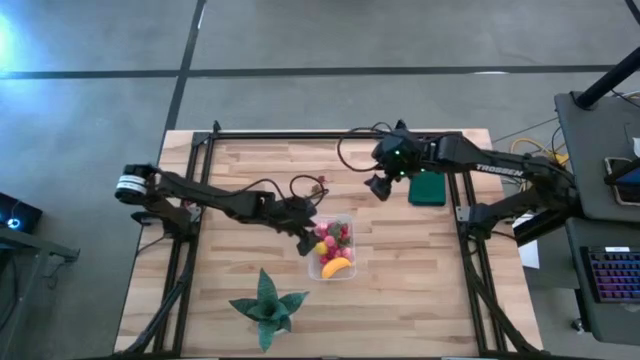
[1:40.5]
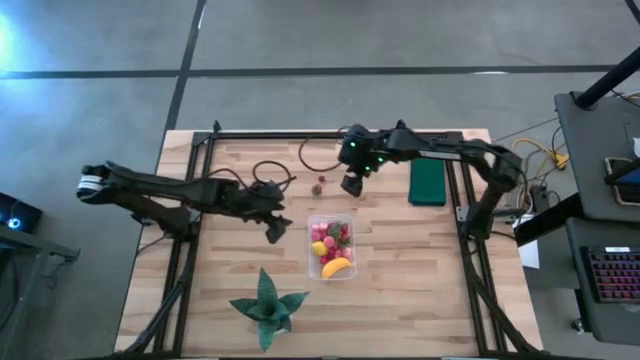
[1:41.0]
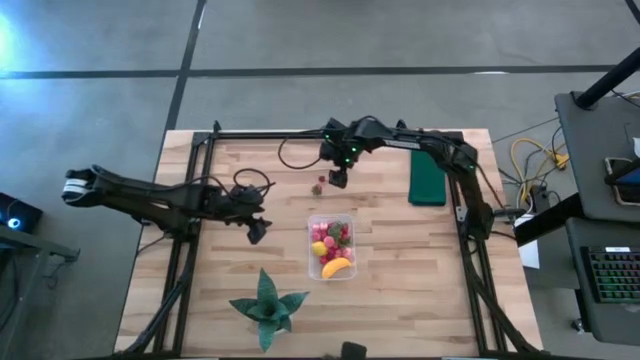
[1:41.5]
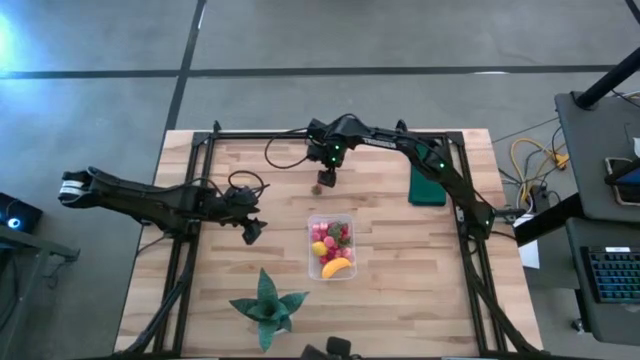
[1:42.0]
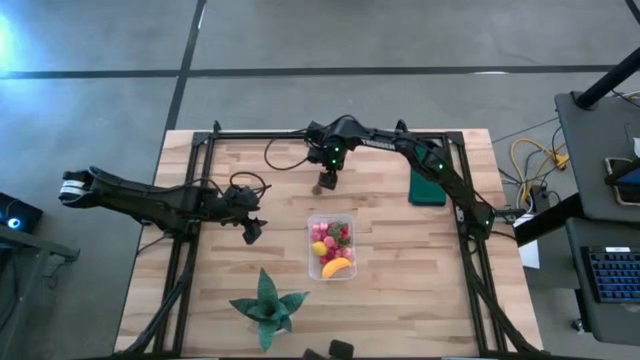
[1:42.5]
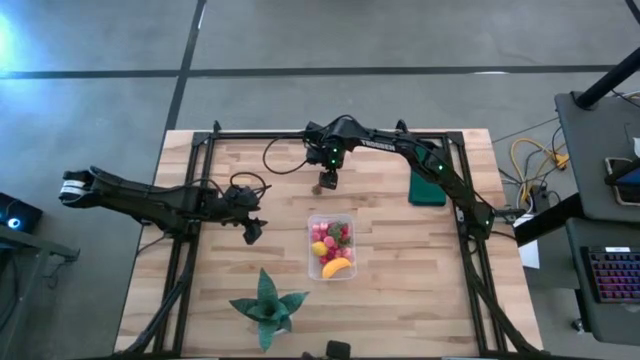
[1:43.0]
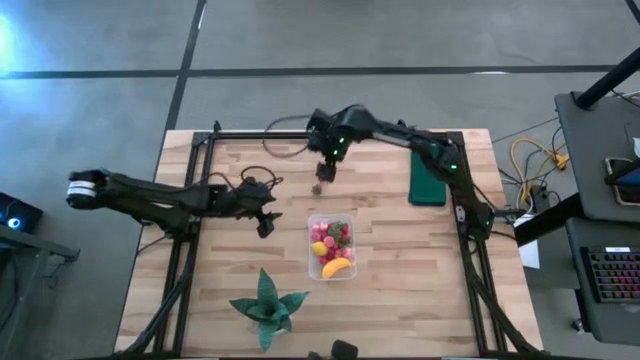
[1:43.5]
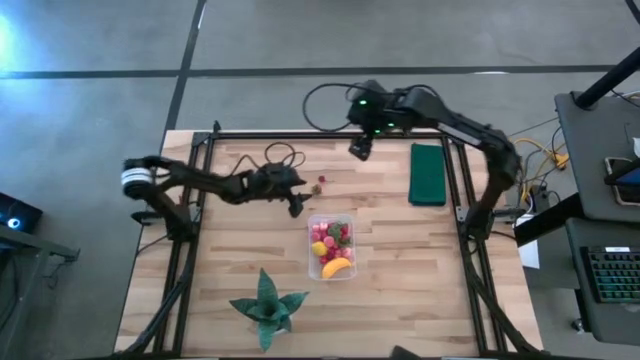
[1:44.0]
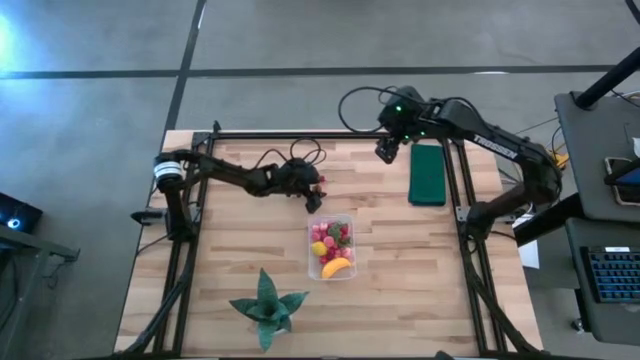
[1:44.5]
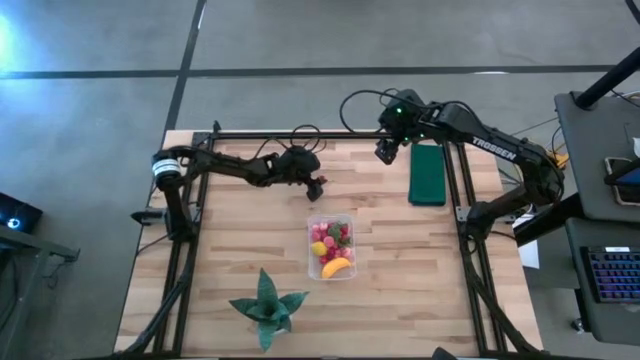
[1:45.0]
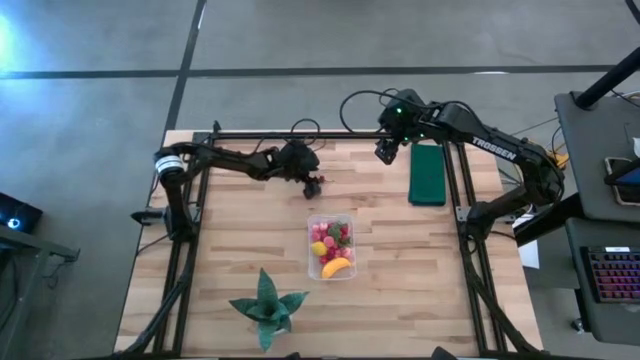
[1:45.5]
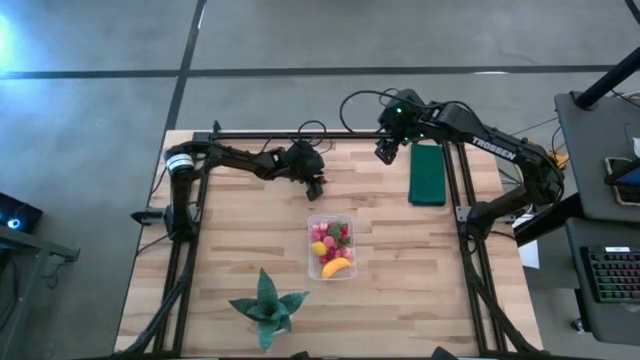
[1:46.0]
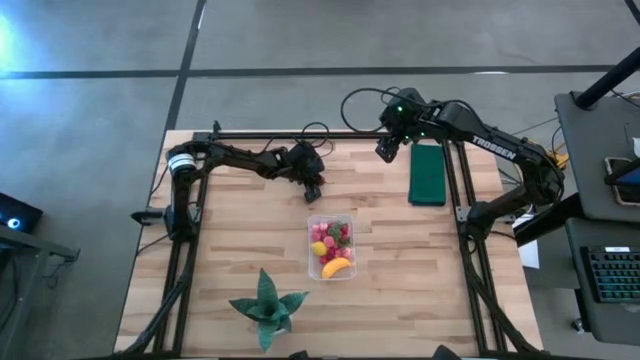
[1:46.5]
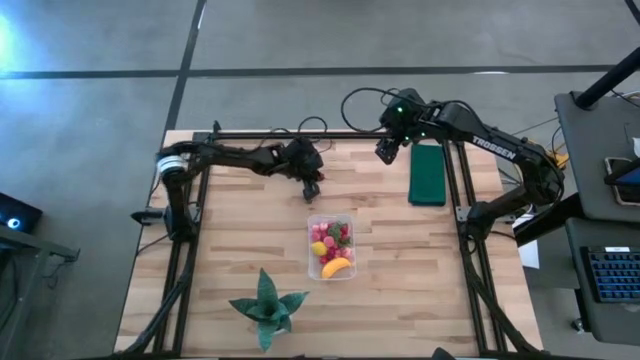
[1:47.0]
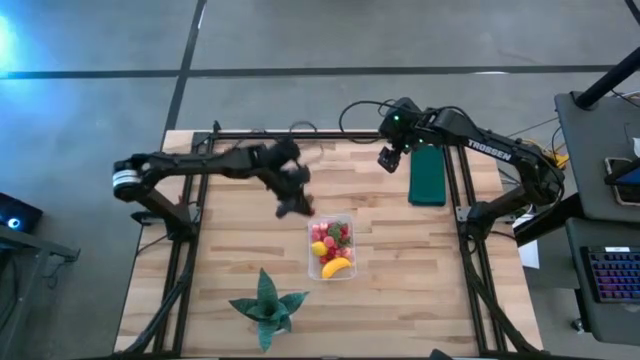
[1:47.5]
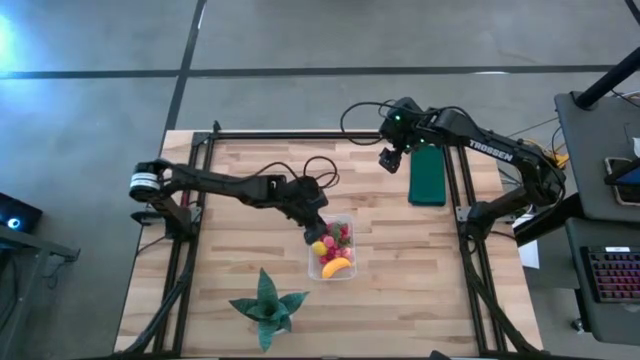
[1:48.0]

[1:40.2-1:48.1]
Task: Pick and placing Produce into tupperware
Put the cherry into the transparent bin

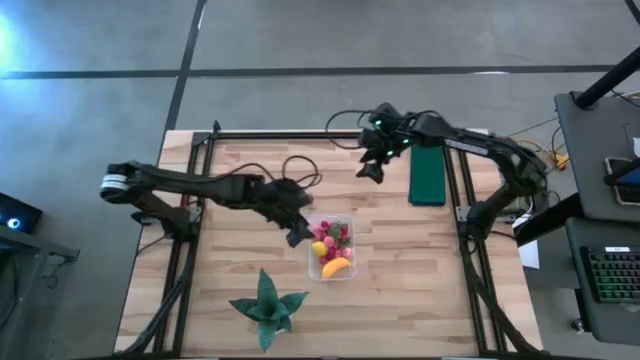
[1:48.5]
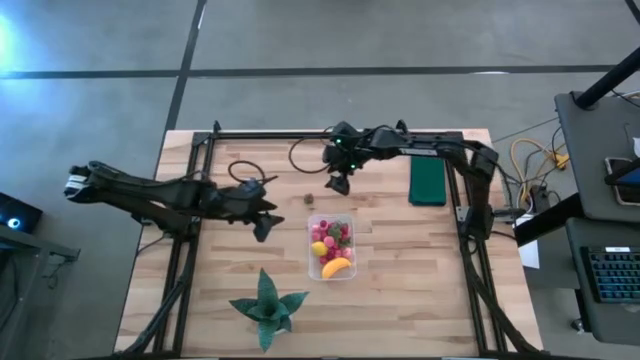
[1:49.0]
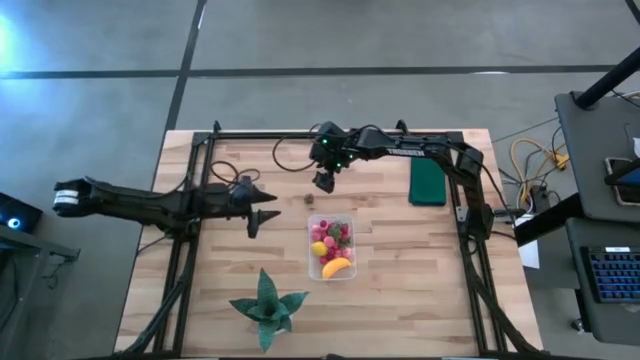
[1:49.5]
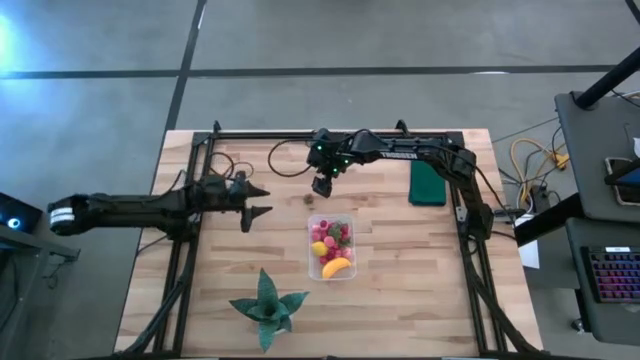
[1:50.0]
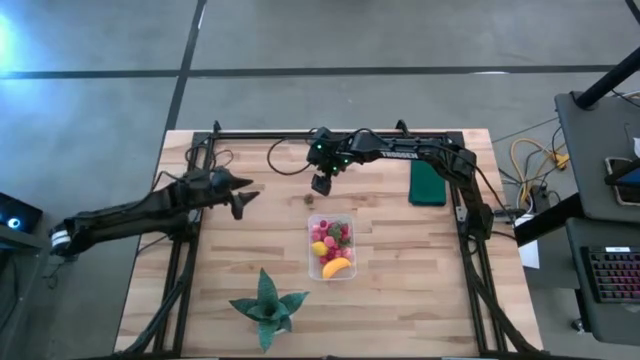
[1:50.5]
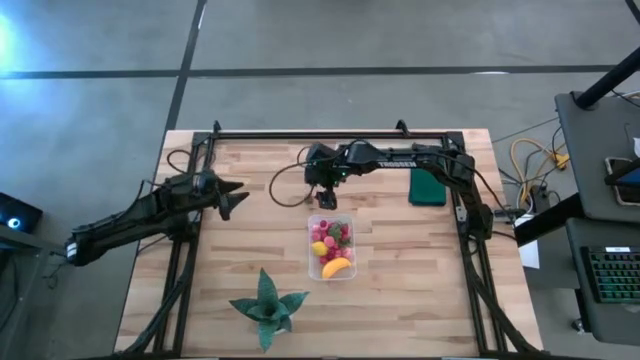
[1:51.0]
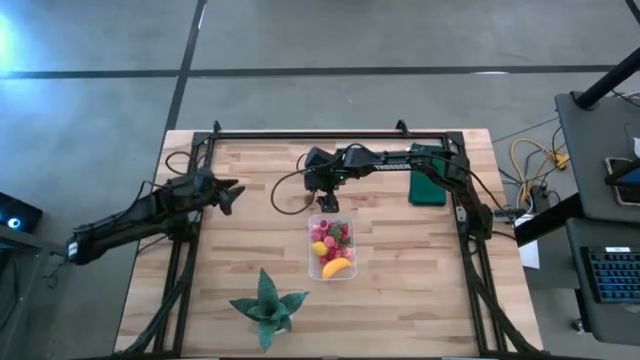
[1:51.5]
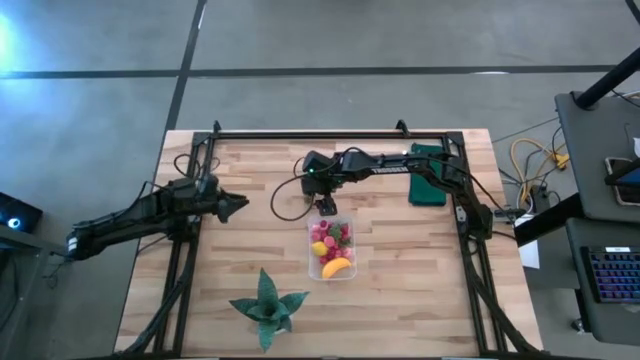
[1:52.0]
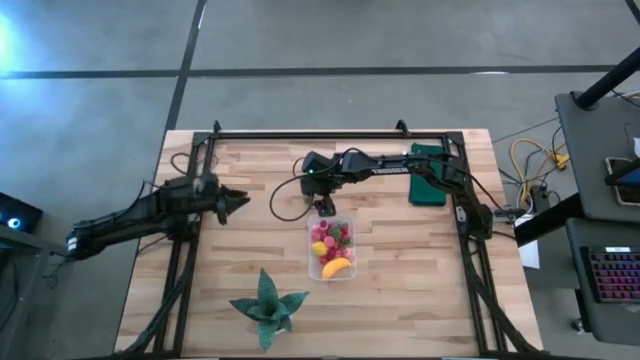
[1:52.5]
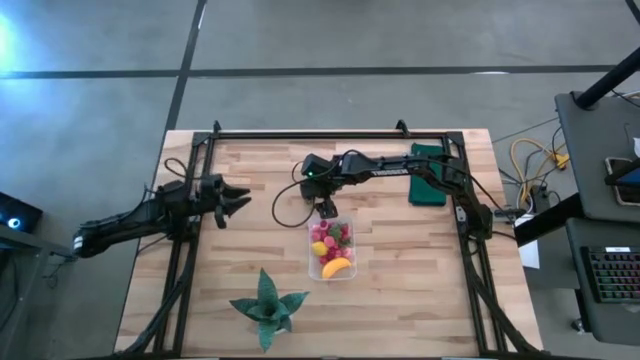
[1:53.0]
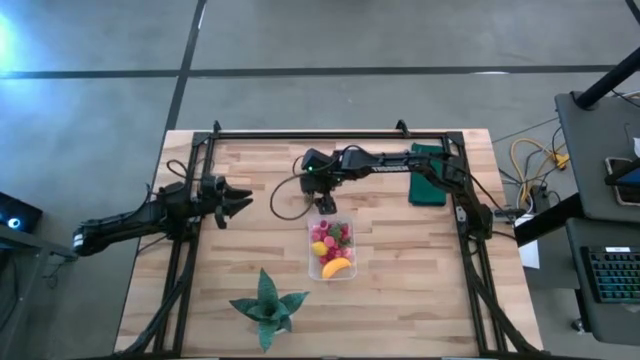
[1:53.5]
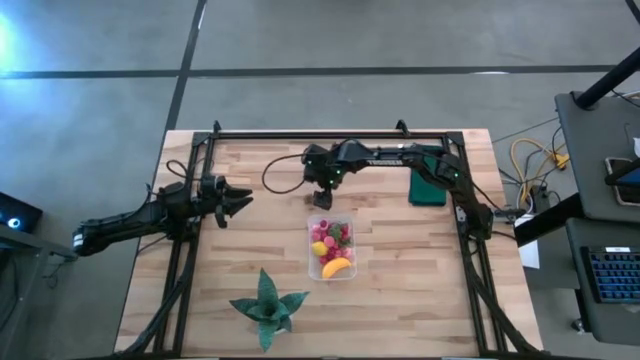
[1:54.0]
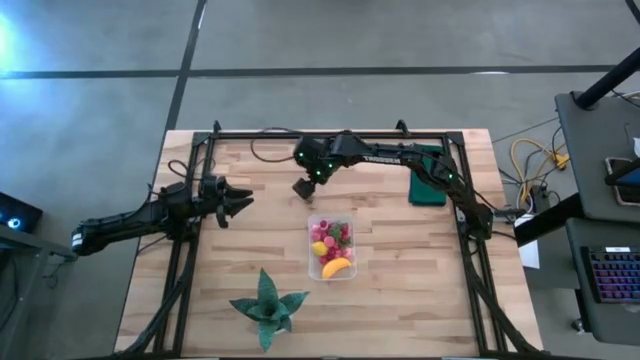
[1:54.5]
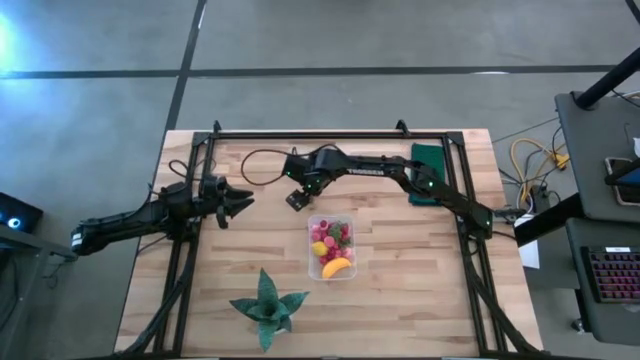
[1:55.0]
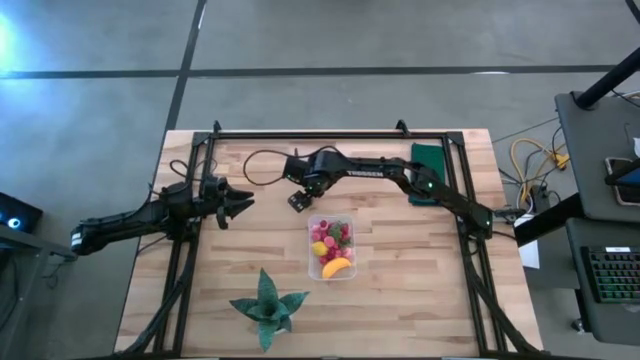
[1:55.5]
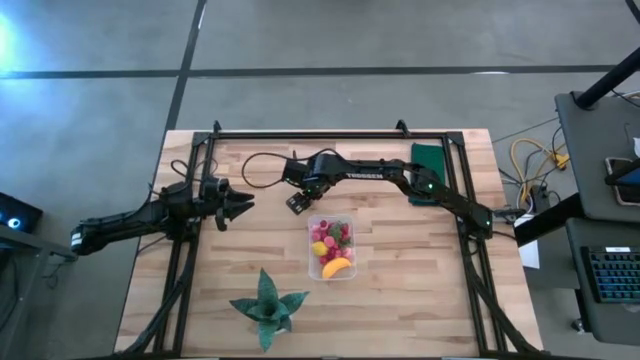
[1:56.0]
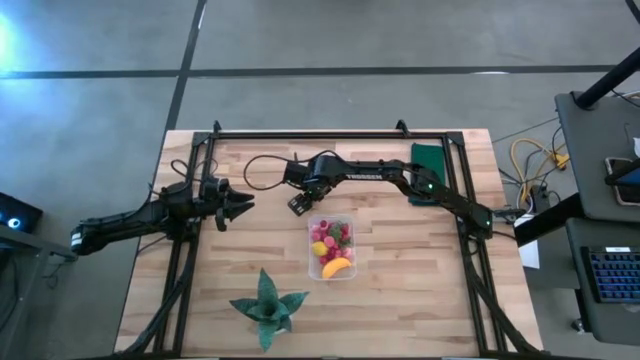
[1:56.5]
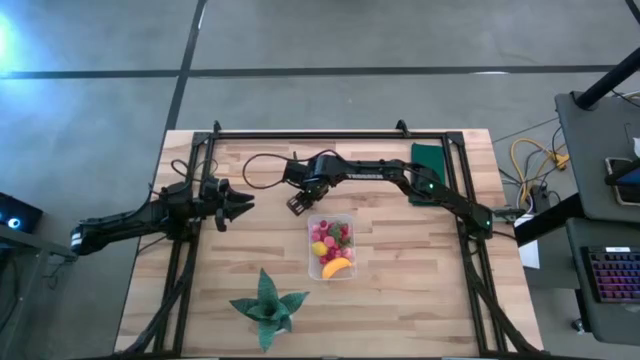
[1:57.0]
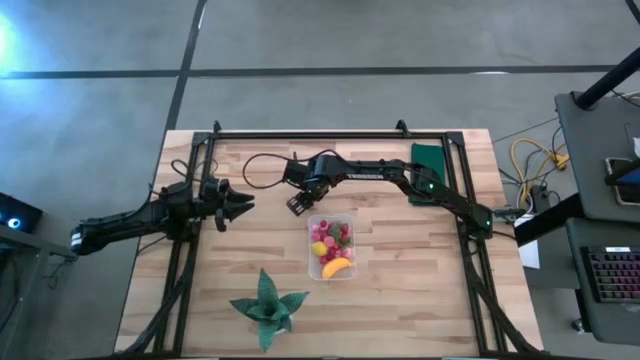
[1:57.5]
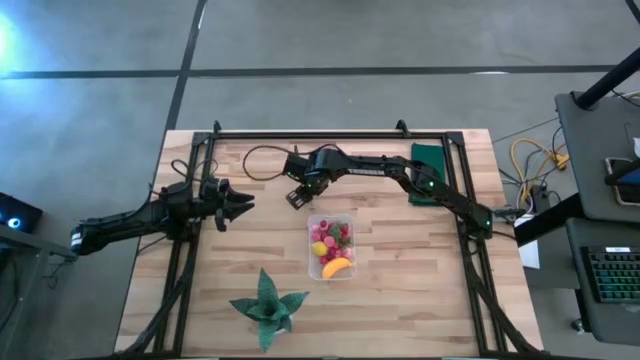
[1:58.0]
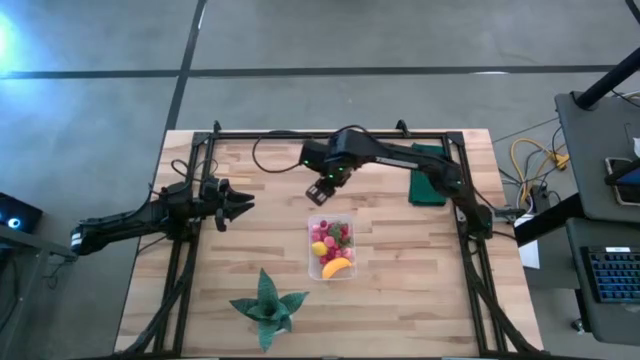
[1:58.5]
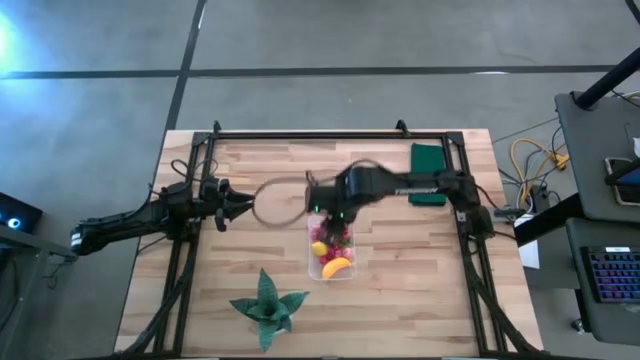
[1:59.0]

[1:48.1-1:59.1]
Put the strawberry into the bin

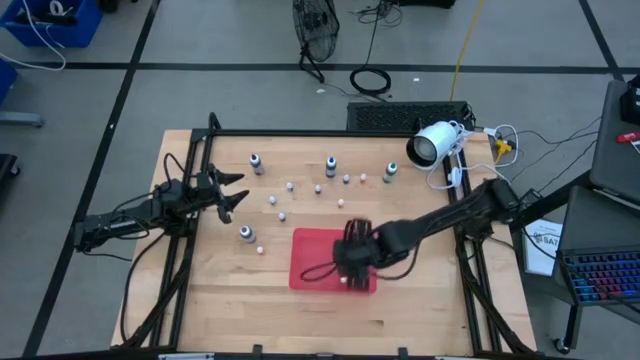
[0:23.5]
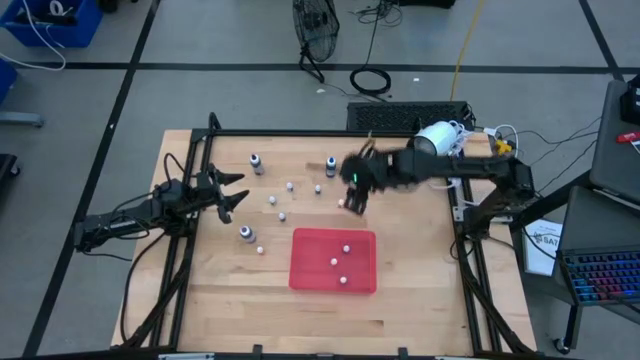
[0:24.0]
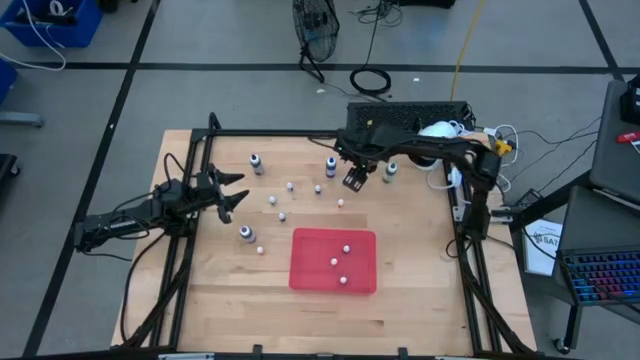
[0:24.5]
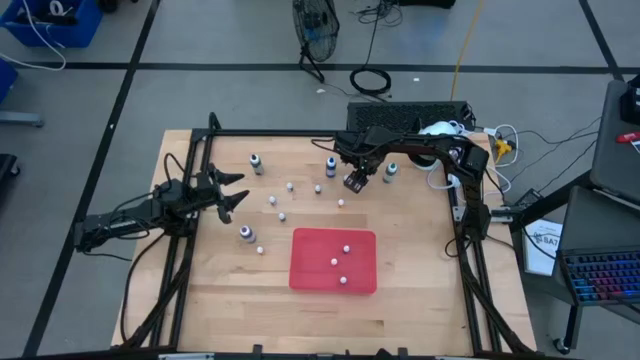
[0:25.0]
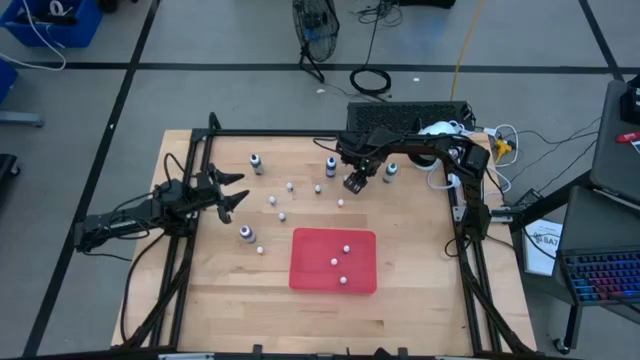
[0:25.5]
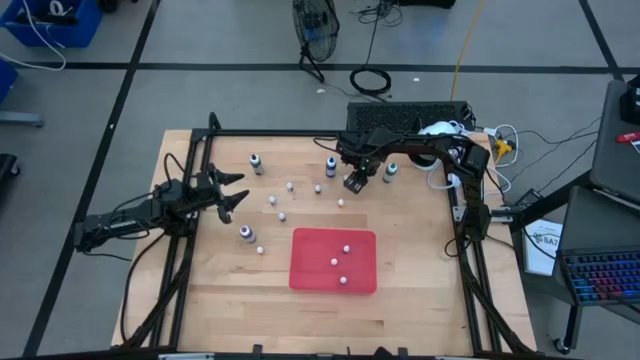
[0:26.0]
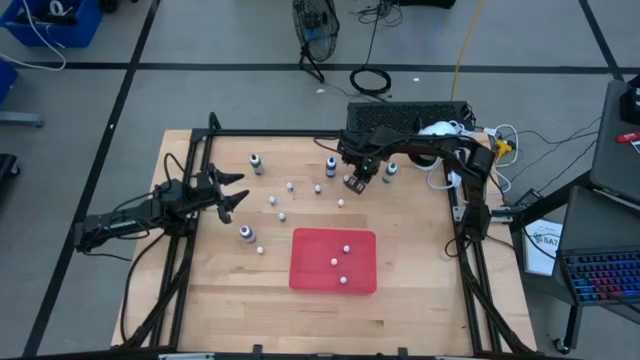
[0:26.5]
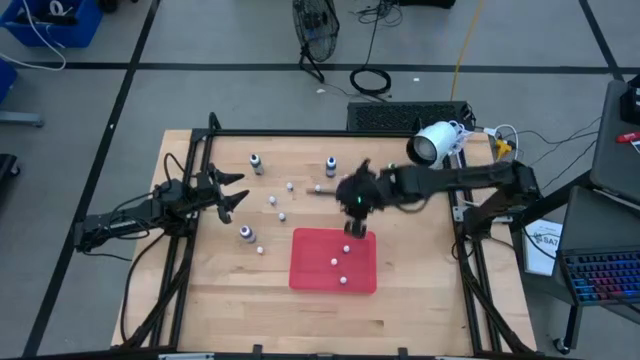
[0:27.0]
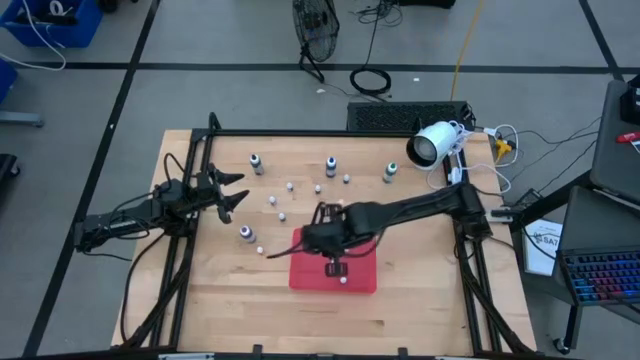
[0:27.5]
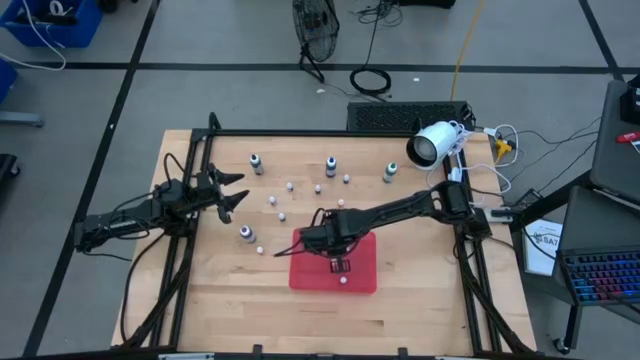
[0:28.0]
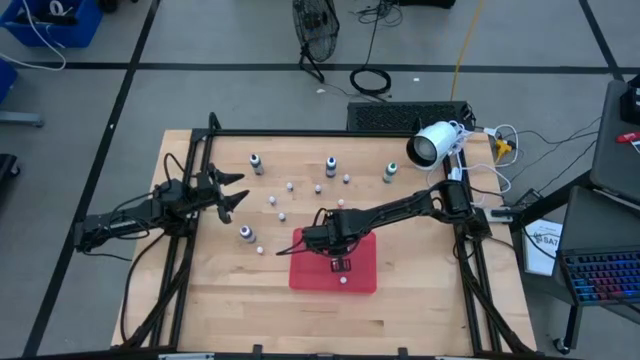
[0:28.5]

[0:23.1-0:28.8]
Task: Pick & Place food coloring
Put the small orange food coloring bottle into the red bin
